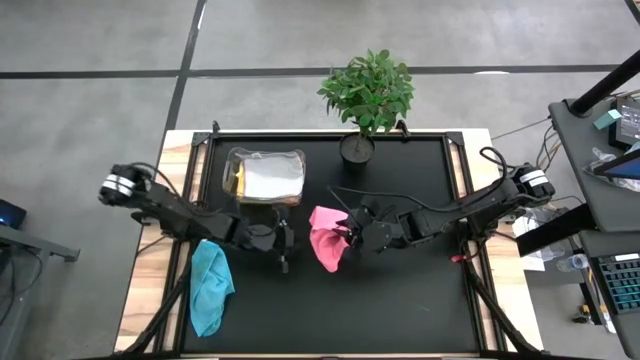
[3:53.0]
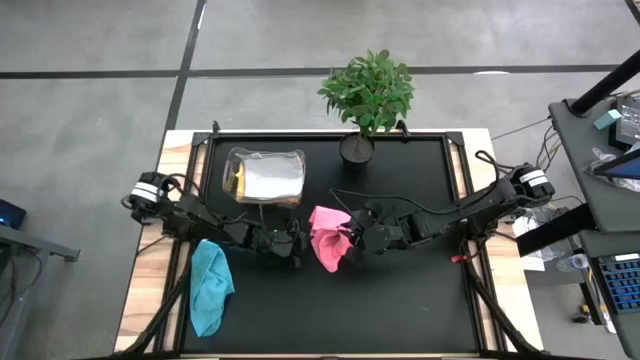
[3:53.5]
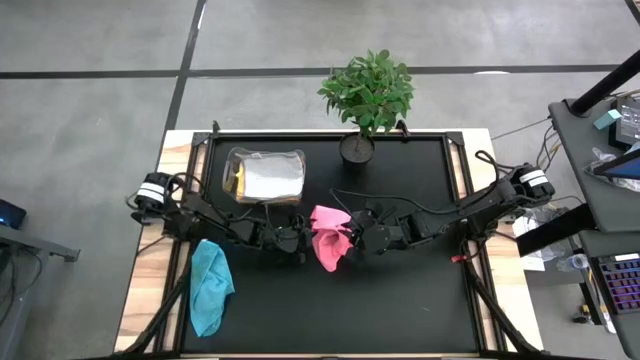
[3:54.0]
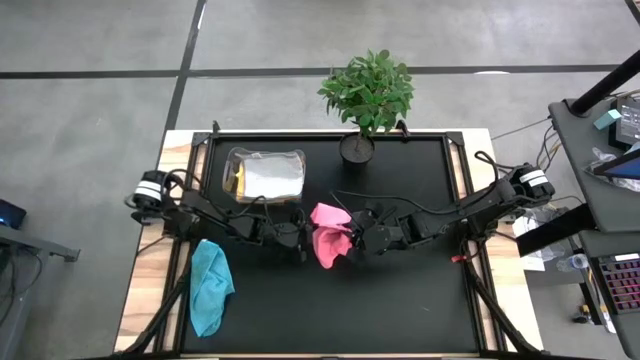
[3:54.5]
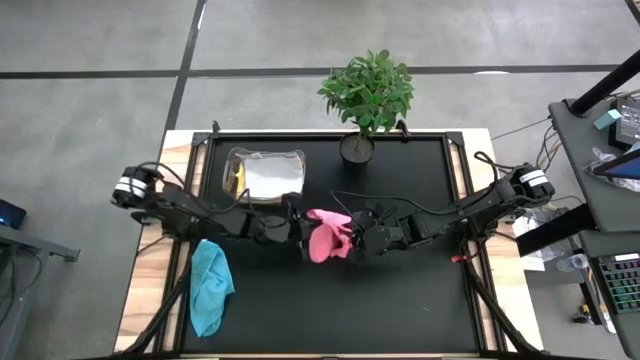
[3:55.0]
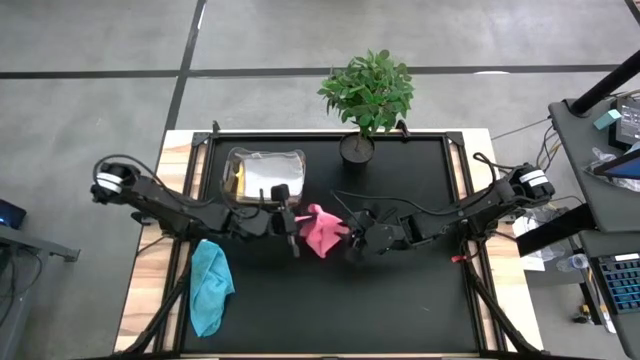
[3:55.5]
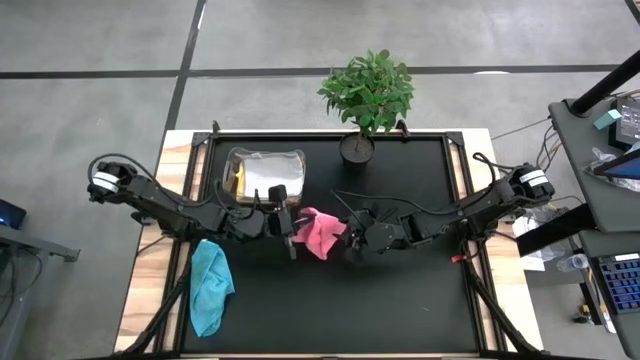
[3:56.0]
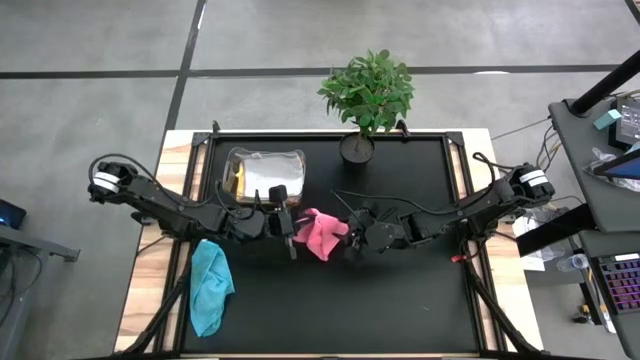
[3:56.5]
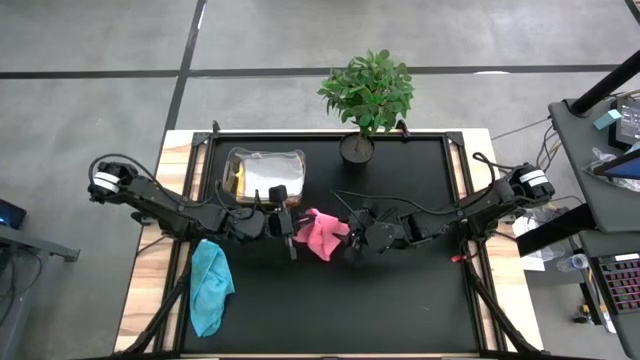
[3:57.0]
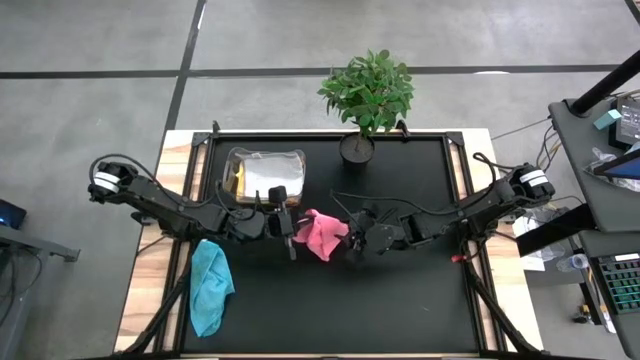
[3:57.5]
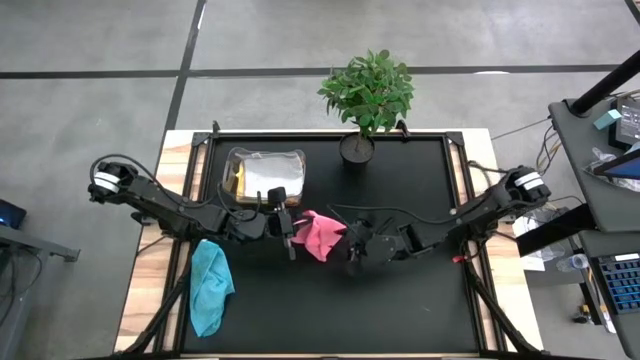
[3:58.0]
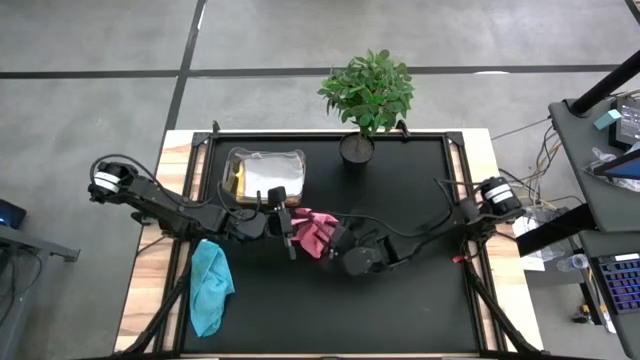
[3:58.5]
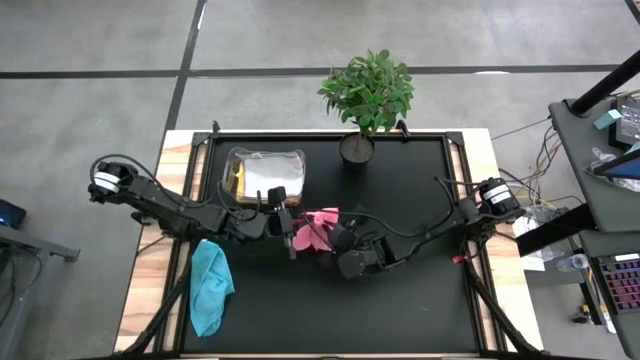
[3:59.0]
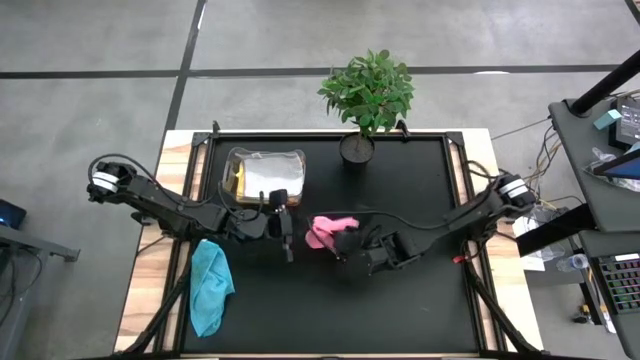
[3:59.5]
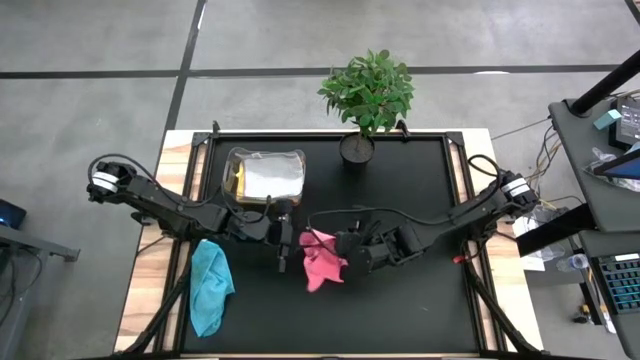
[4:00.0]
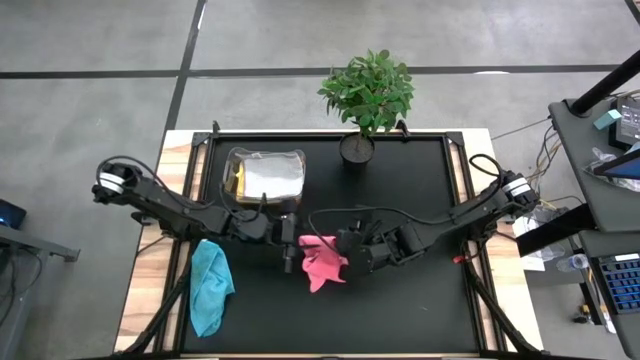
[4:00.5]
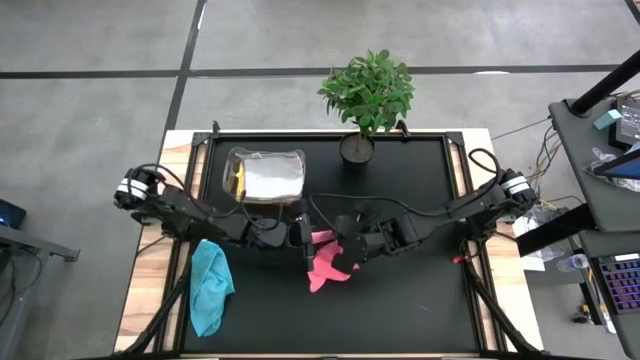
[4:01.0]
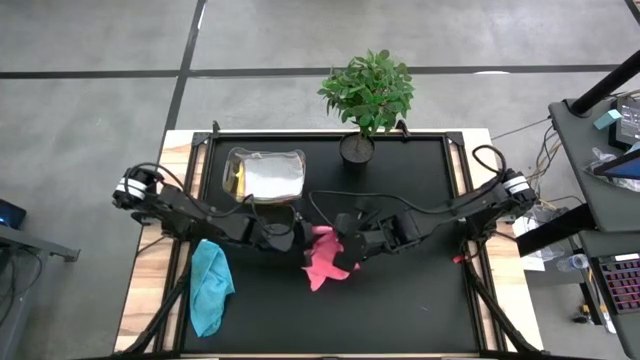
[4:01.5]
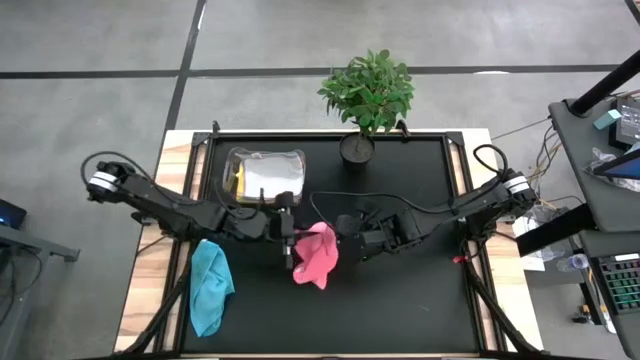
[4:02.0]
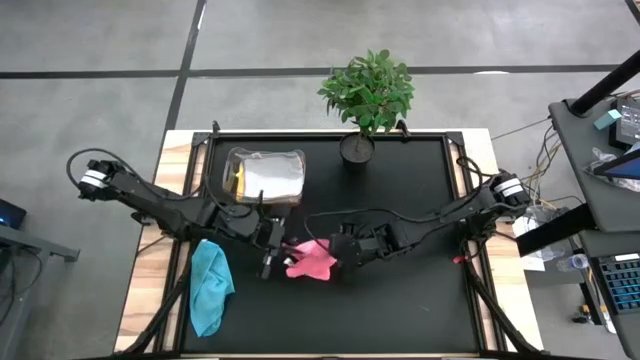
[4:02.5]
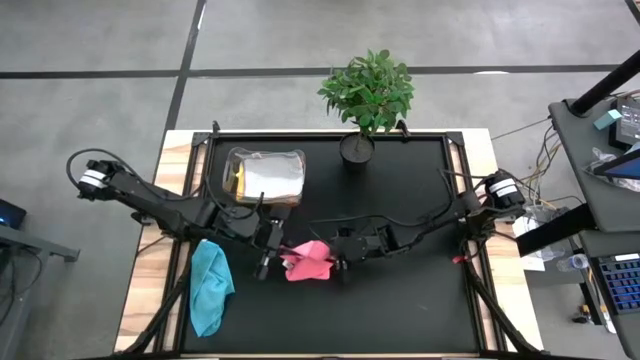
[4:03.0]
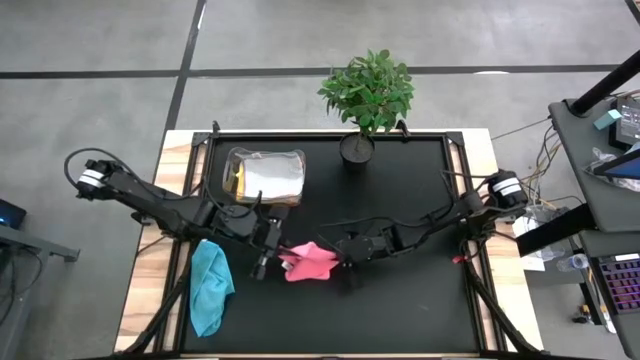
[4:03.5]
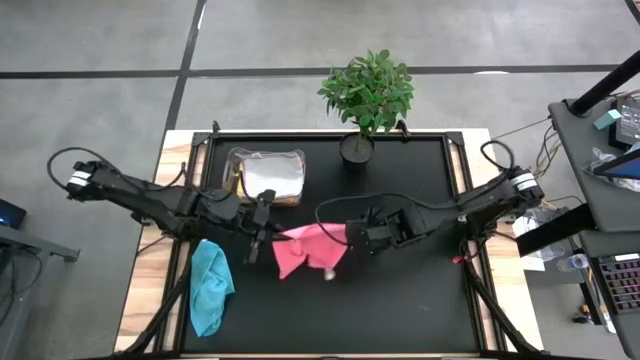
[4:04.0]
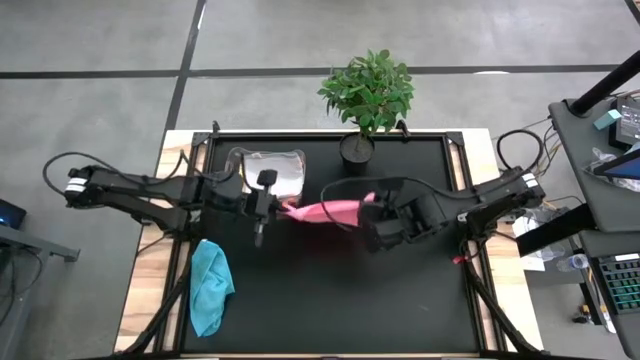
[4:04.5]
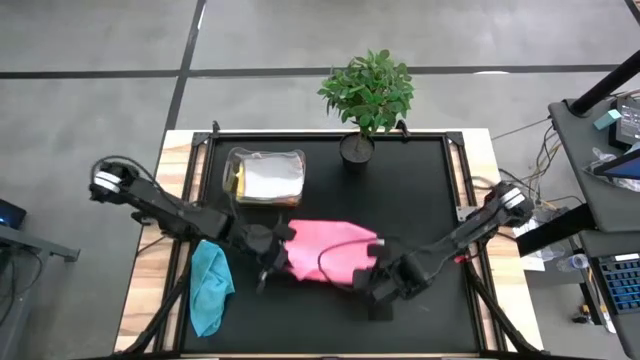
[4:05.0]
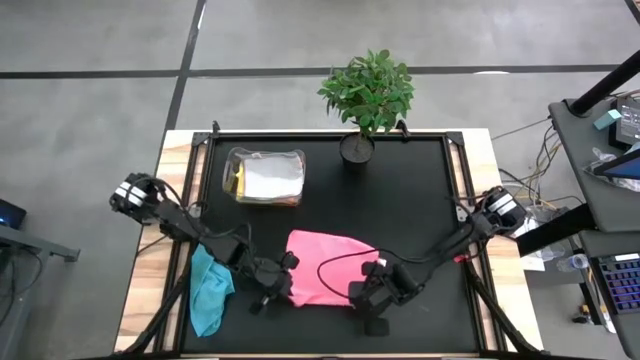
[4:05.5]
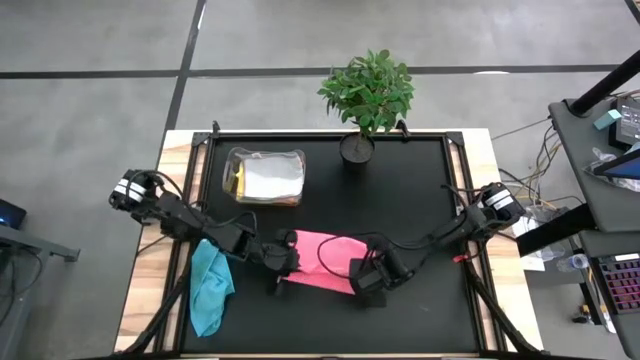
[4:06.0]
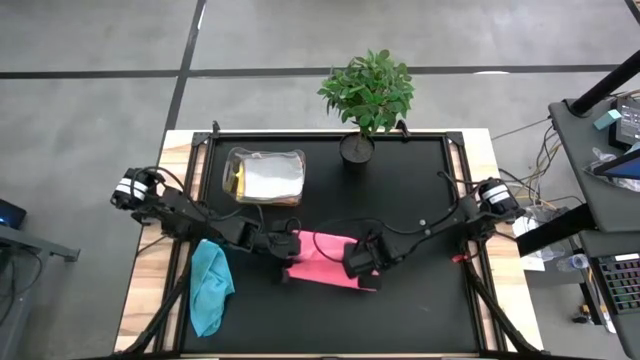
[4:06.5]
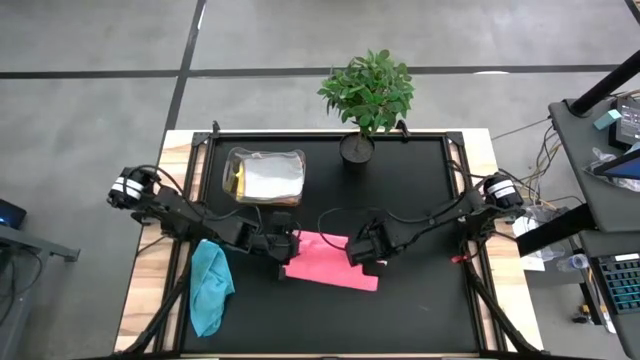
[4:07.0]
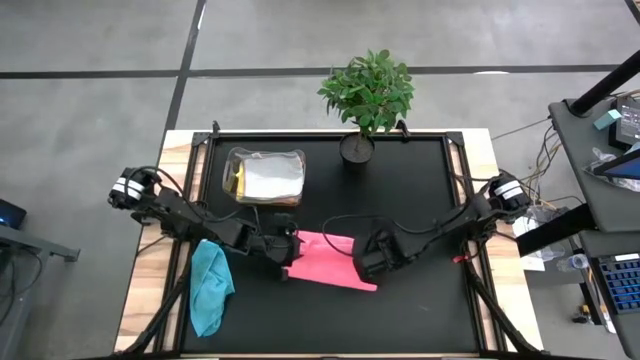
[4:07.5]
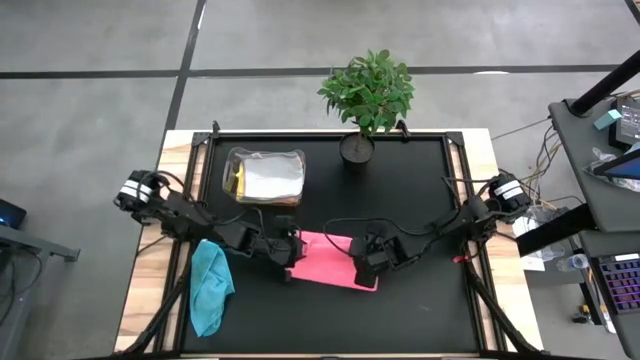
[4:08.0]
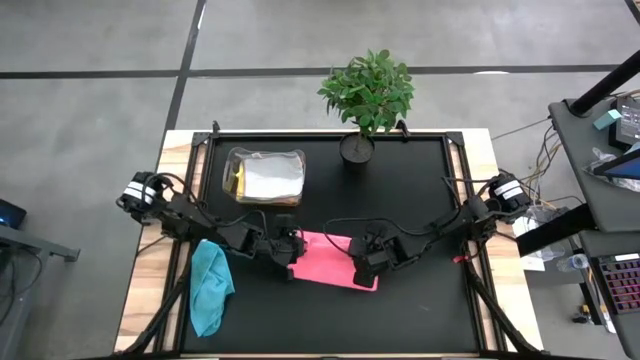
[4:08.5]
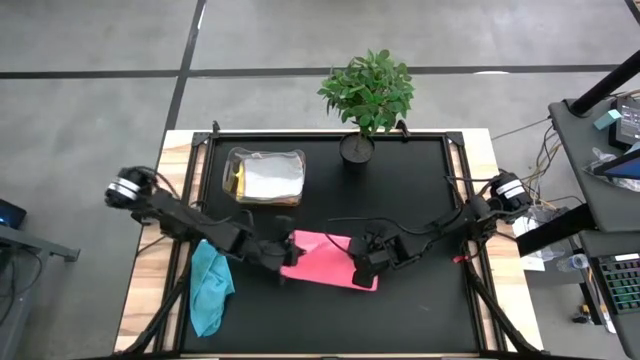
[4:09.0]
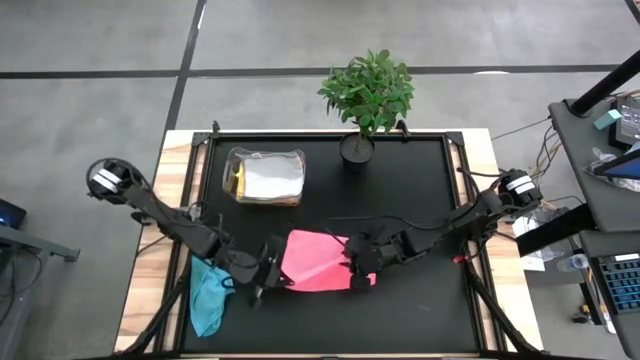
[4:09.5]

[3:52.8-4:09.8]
Task: Fold microfiber towels
Fold the pink towel

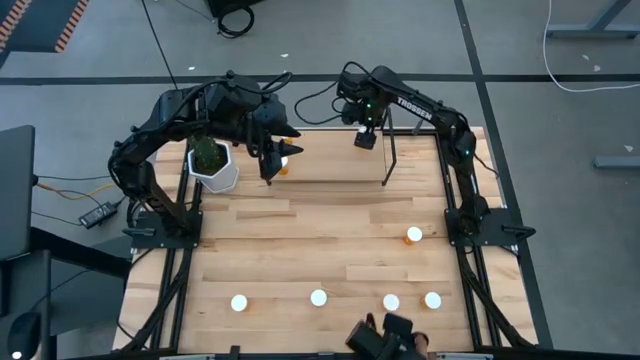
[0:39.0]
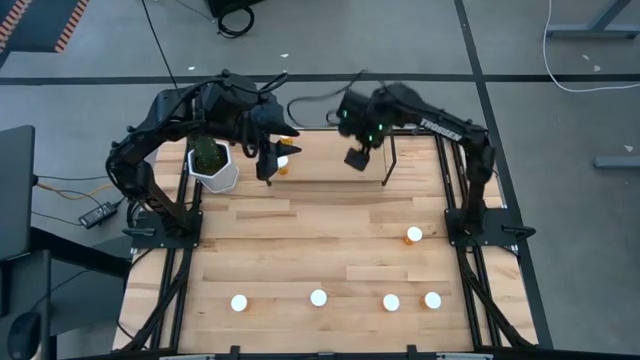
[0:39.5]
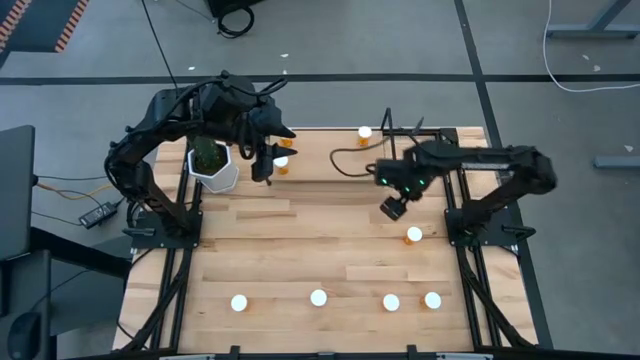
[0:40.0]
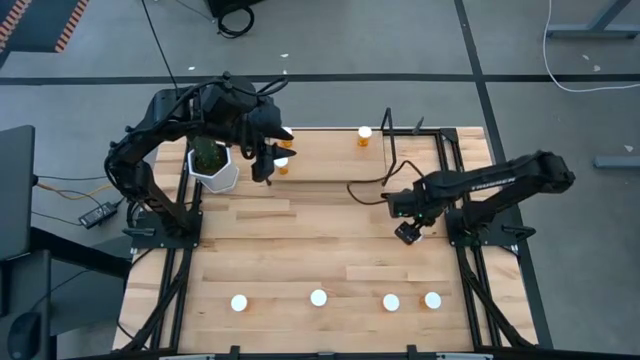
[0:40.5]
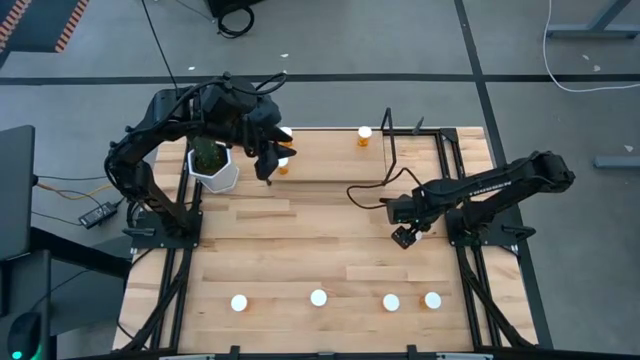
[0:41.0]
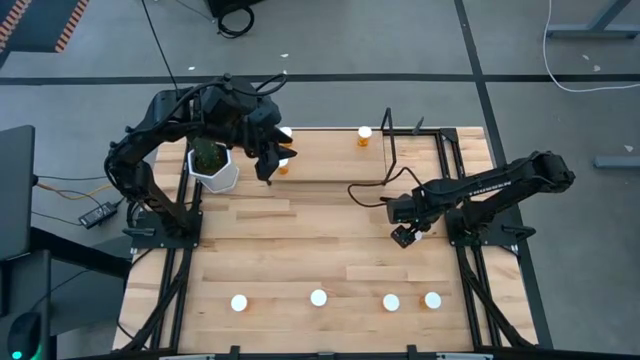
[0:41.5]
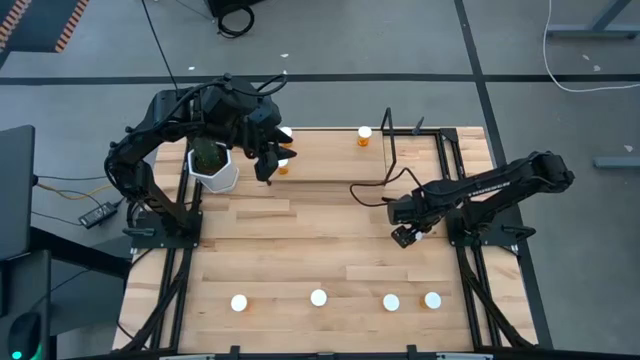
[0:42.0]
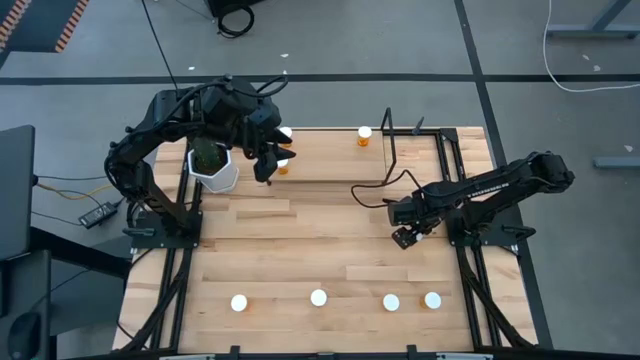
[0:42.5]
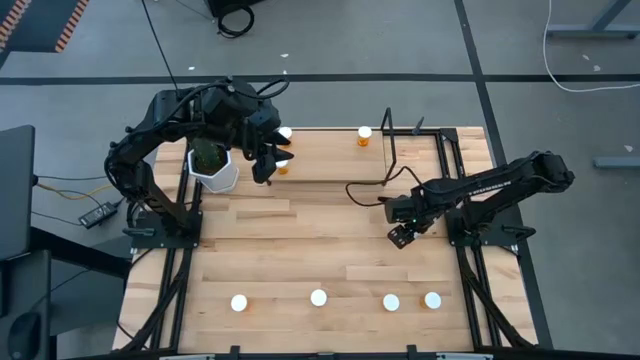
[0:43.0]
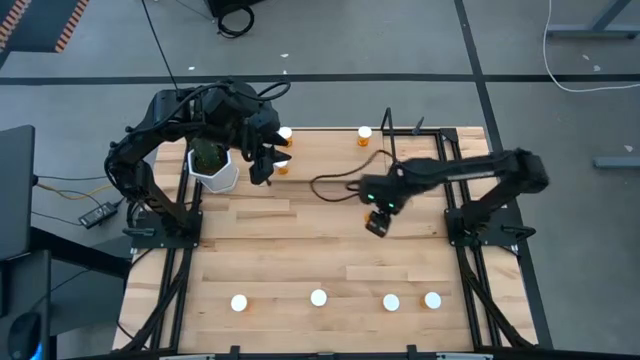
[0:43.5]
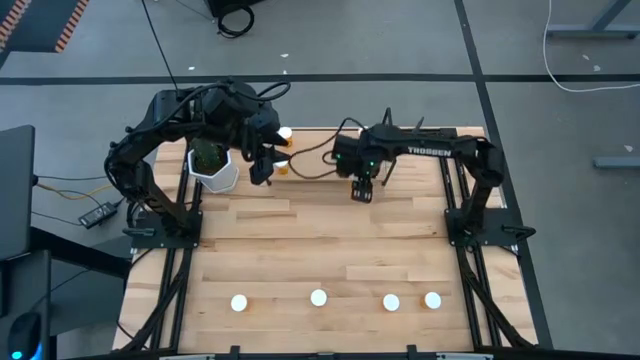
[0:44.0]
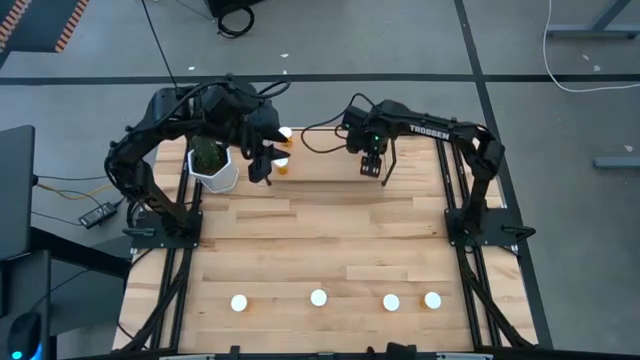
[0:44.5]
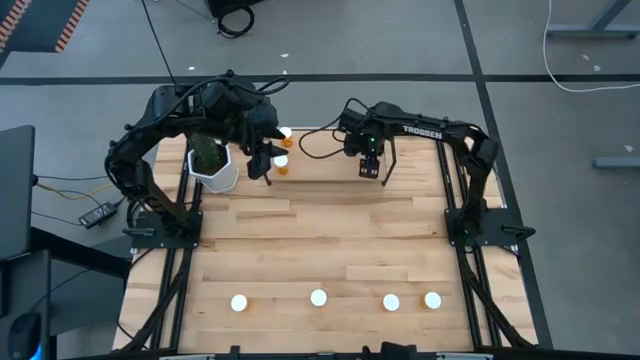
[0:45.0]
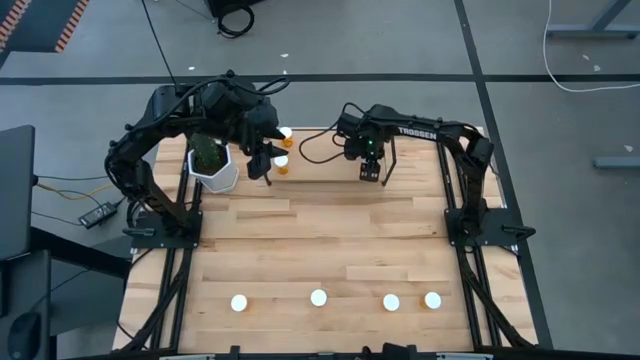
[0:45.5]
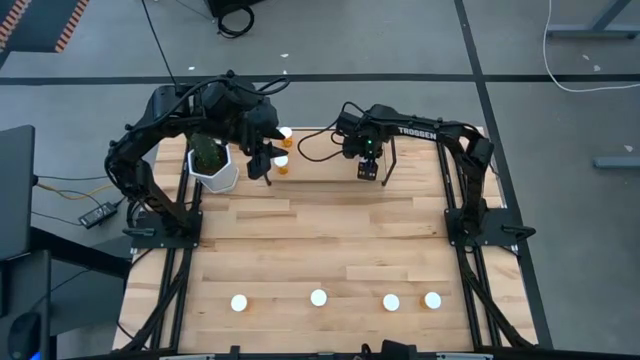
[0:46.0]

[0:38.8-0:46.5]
Task: Pick and place medicine bottles onto shelf by color
Put the orange pill bottle on the shelf
